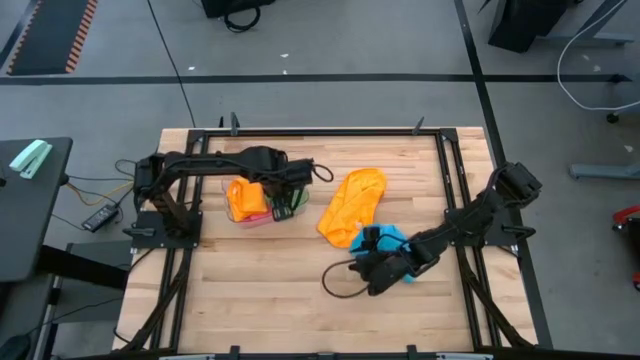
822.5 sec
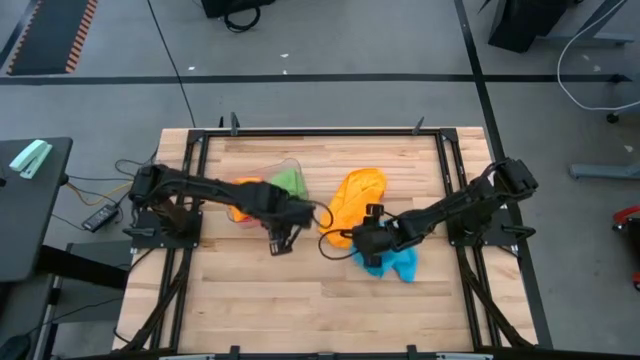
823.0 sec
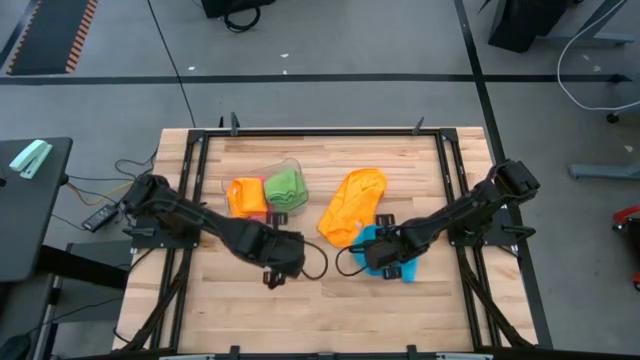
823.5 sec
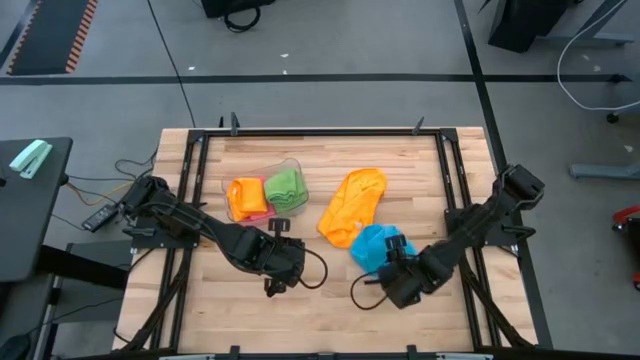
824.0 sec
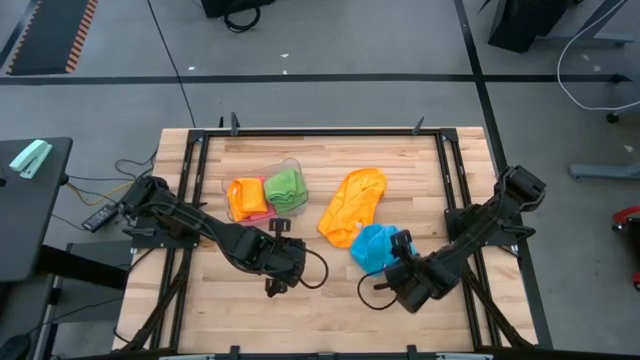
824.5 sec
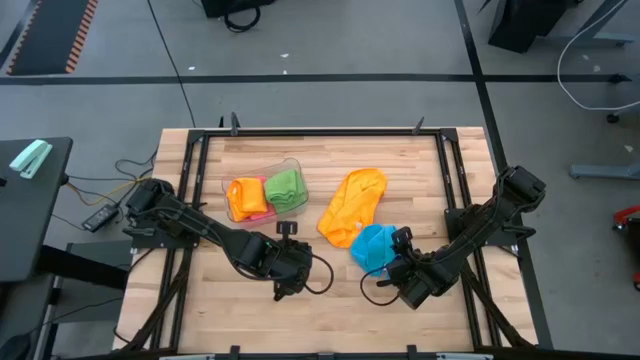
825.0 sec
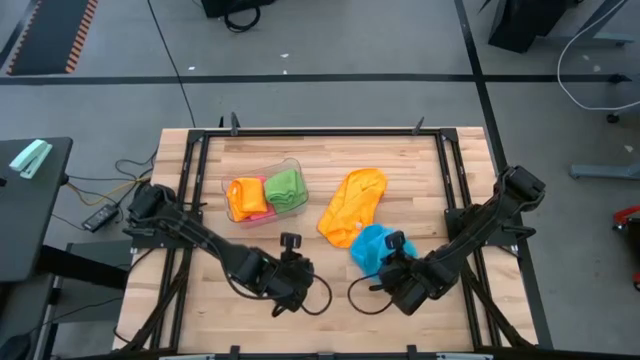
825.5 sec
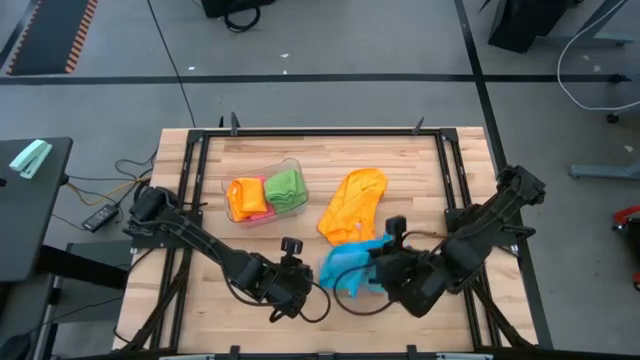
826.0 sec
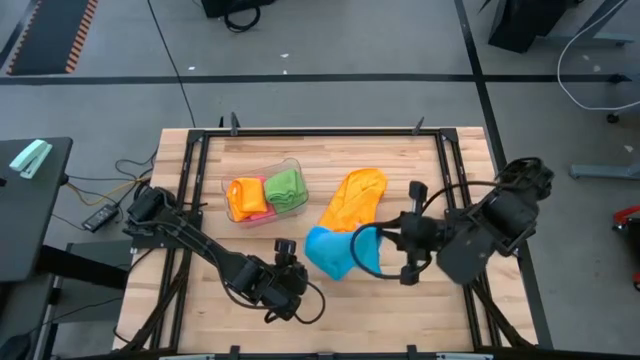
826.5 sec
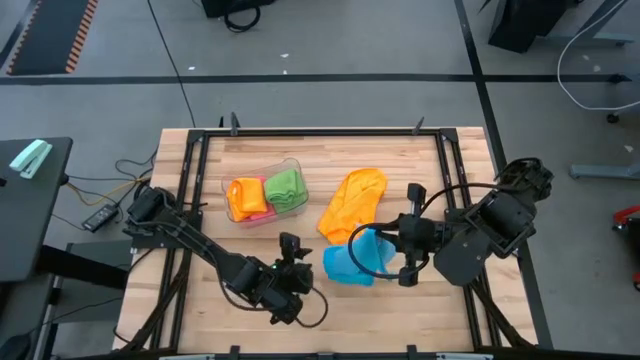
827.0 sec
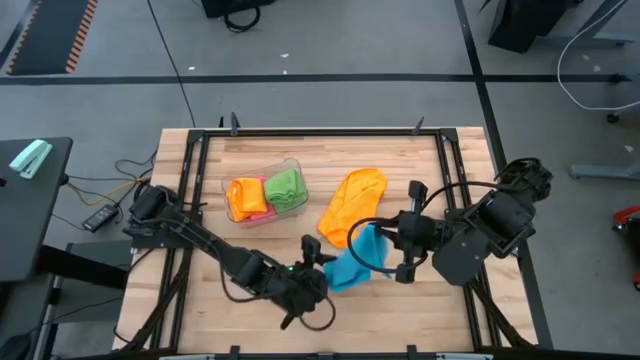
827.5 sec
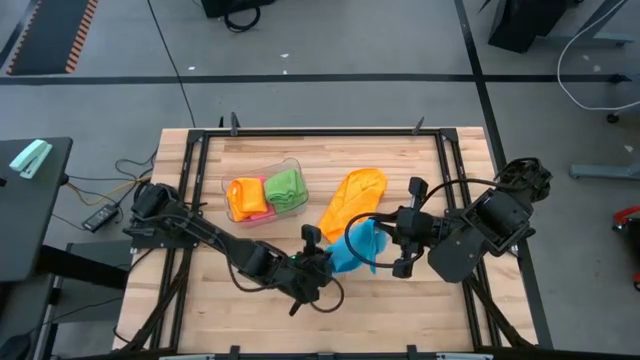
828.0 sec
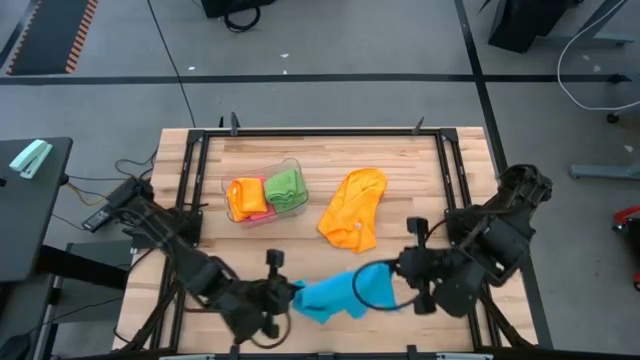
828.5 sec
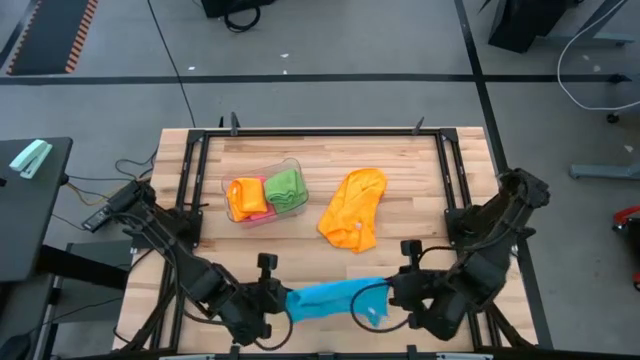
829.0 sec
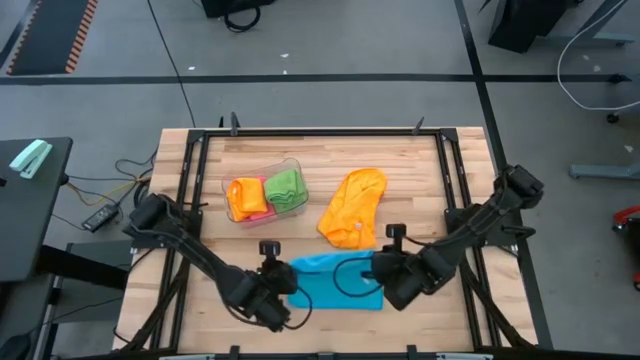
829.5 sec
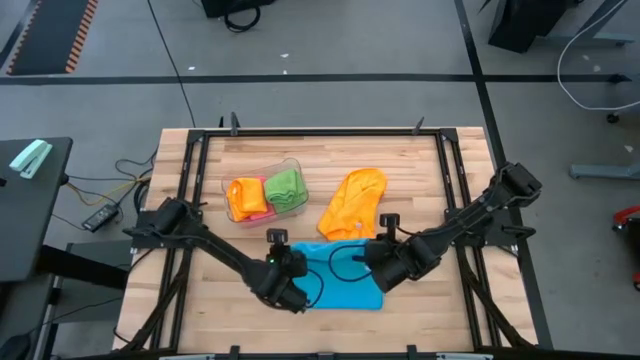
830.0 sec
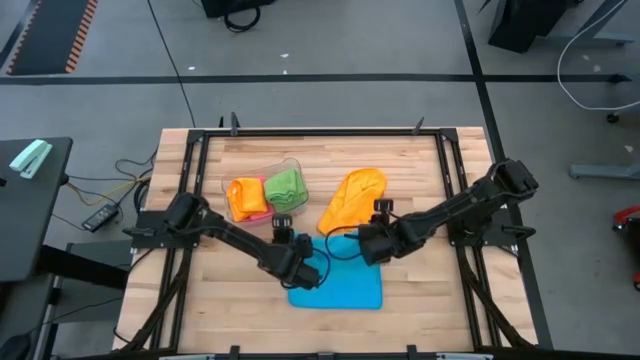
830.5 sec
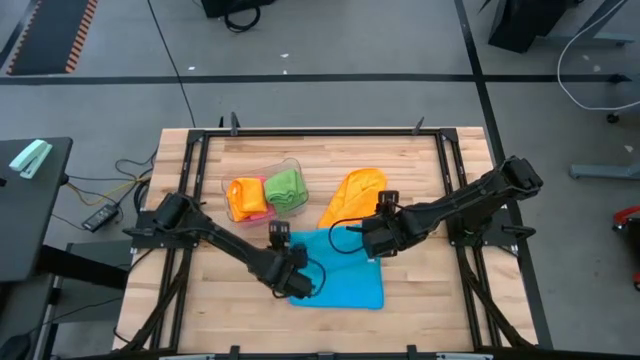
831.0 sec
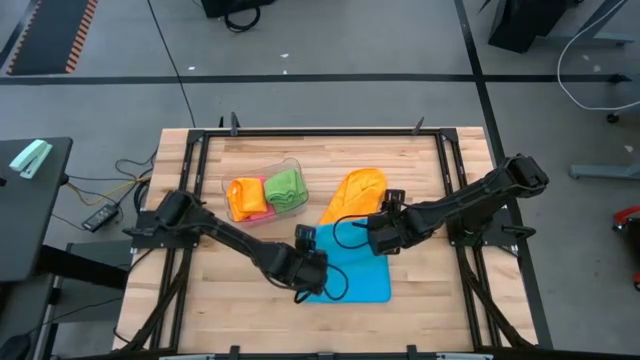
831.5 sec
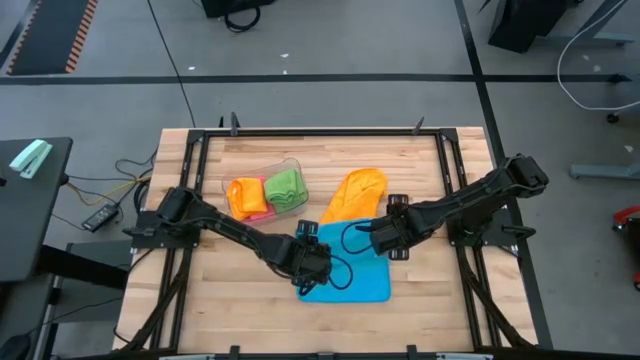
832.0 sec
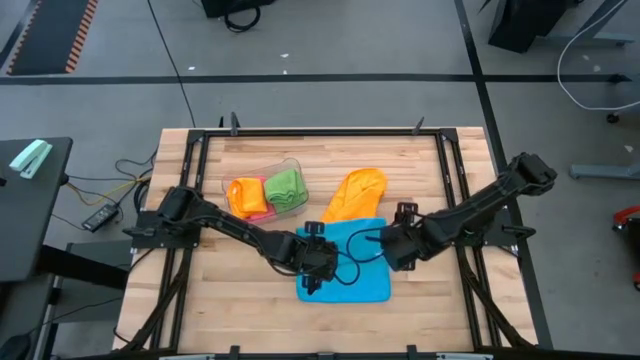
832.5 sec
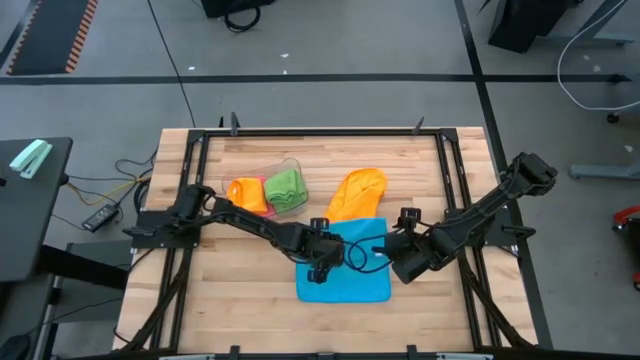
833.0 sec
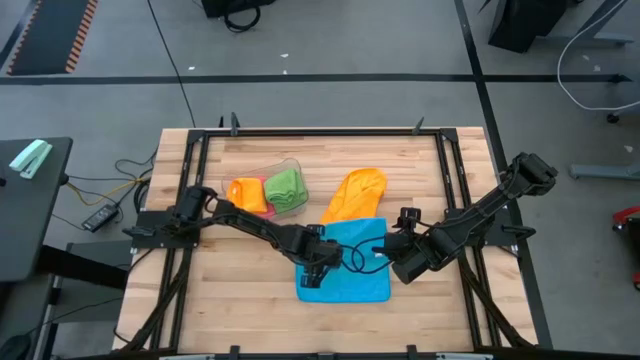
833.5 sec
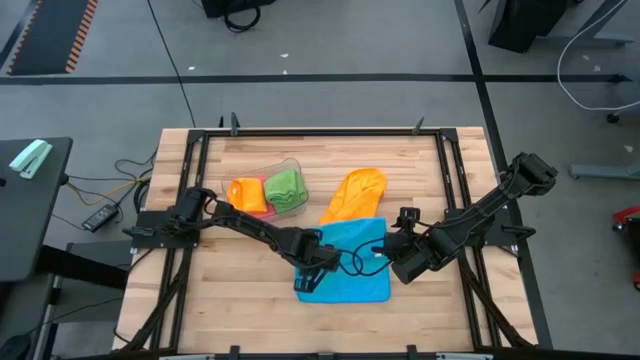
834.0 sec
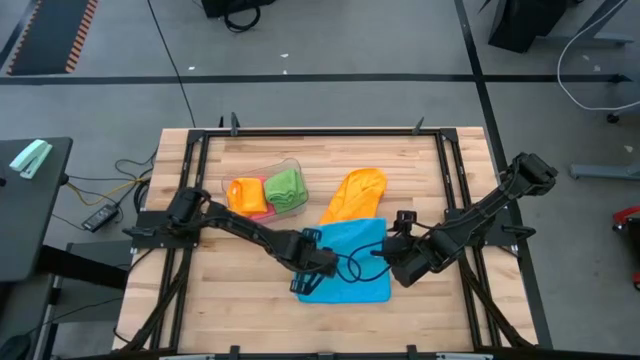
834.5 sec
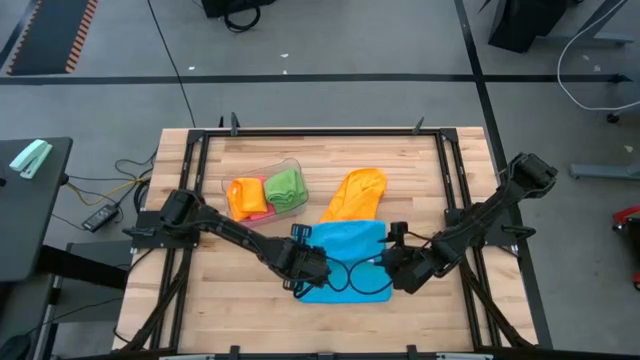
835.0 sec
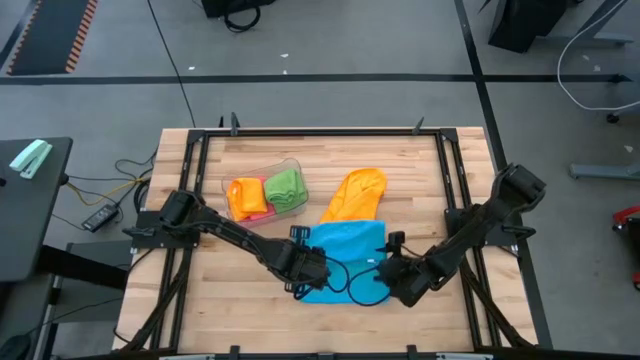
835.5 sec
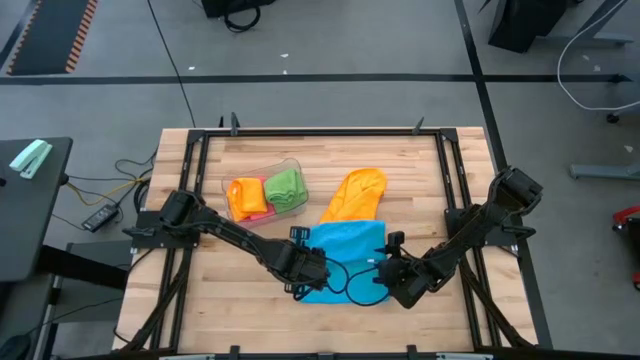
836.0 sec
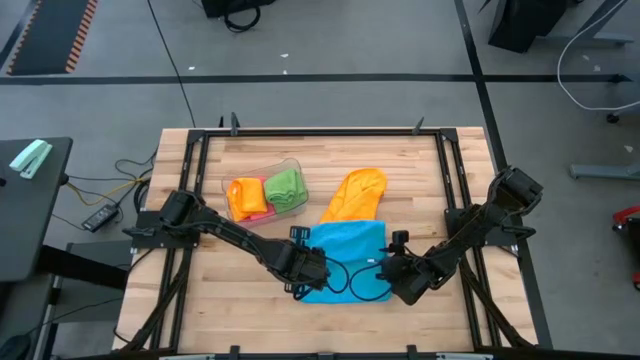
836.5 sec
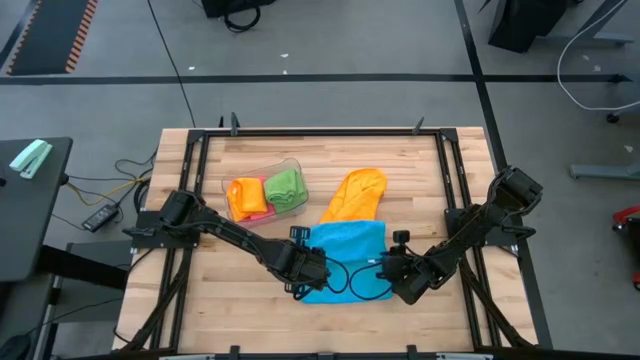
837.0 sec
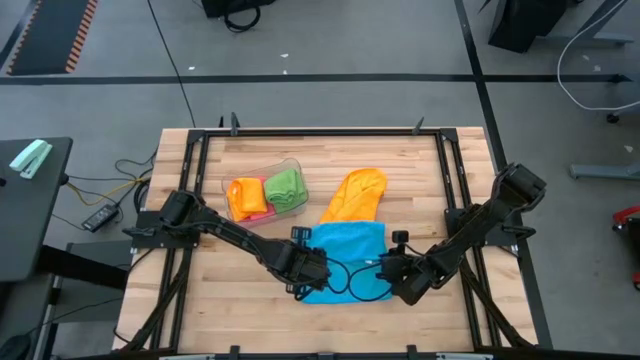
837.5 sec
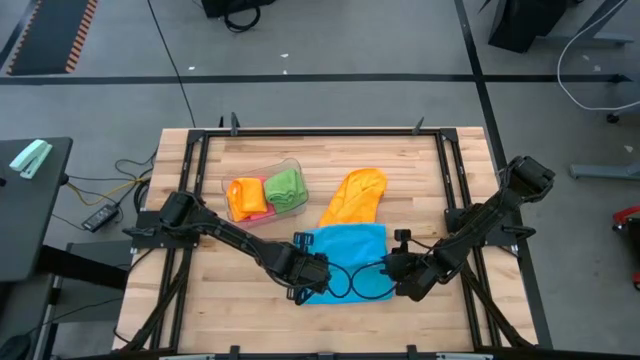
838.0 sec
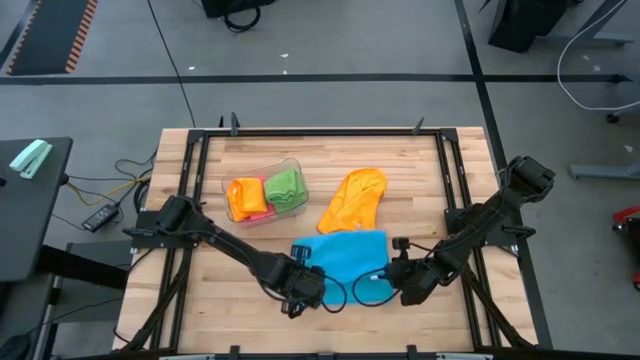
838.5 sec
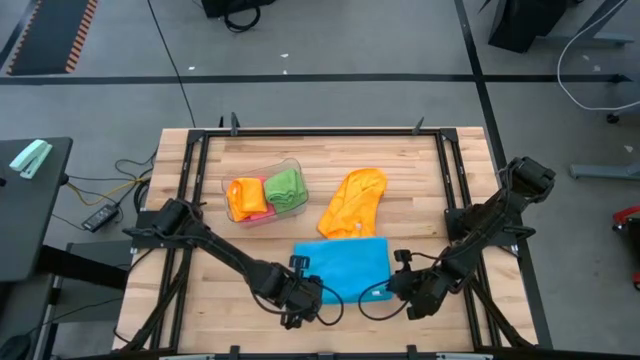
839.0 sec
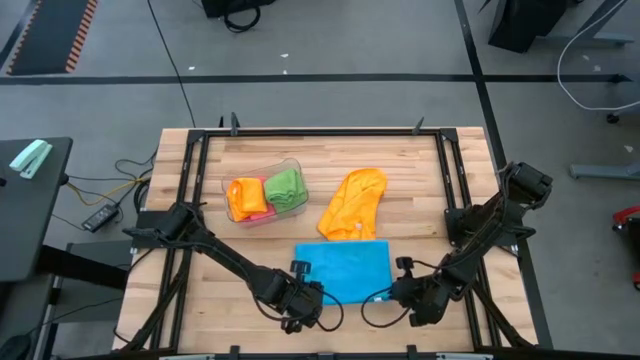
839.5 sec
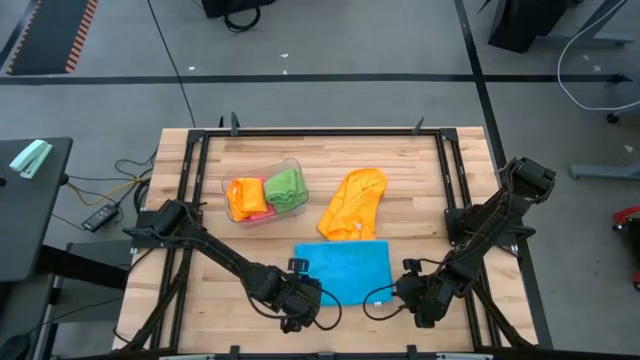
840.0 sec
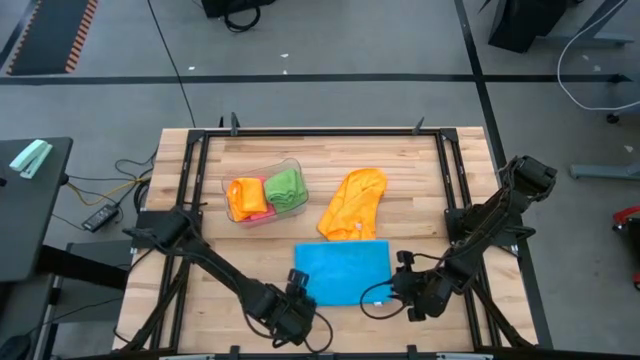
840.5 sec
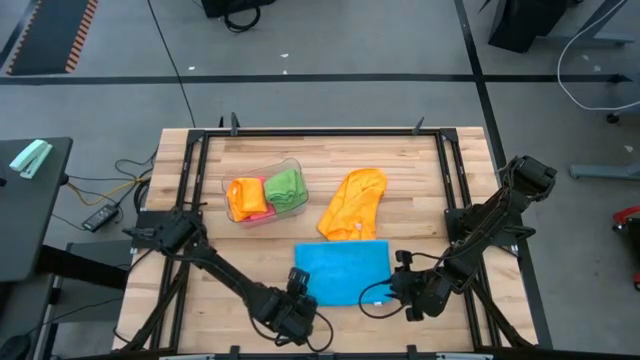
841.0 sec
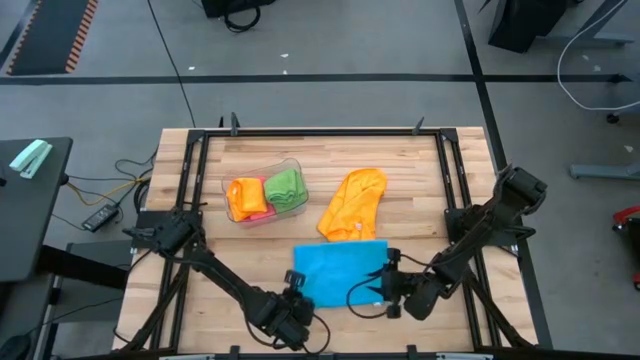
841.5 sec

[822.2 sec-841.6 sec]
Task: Fold microfiber towels
Fold the blue microfiber towel
